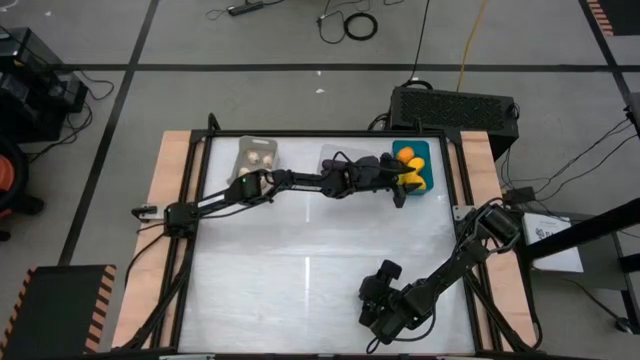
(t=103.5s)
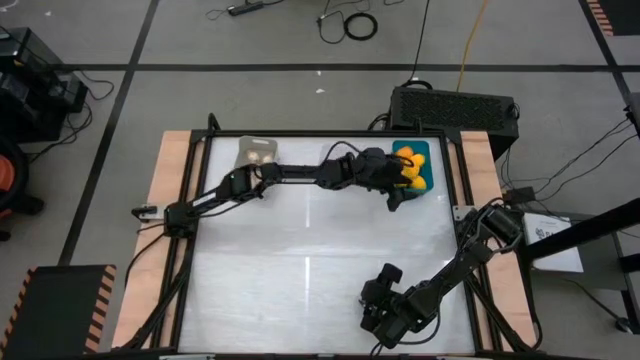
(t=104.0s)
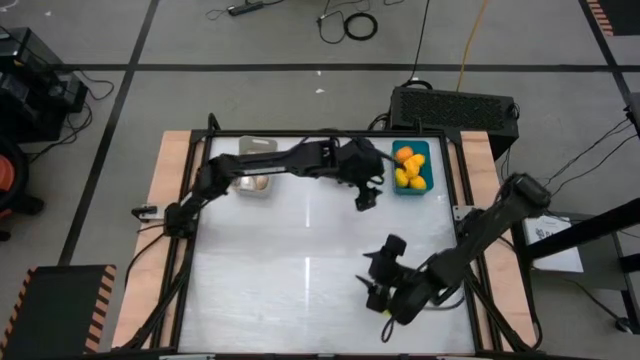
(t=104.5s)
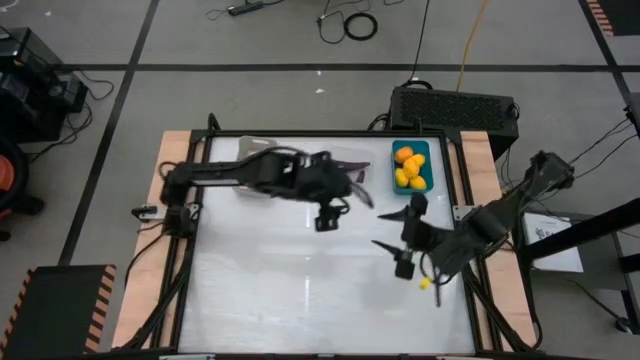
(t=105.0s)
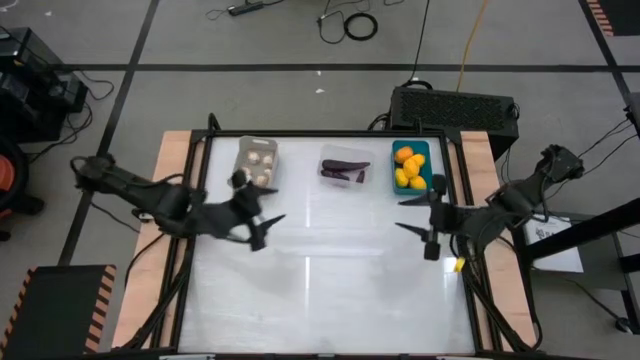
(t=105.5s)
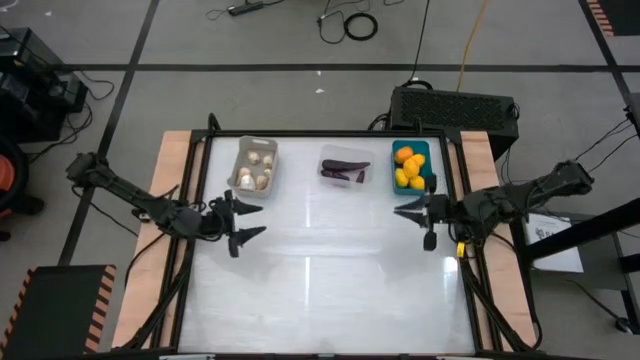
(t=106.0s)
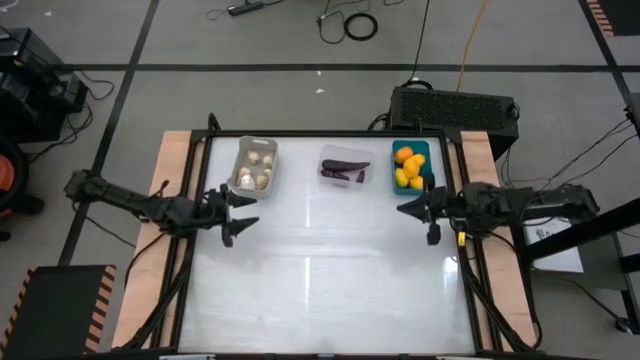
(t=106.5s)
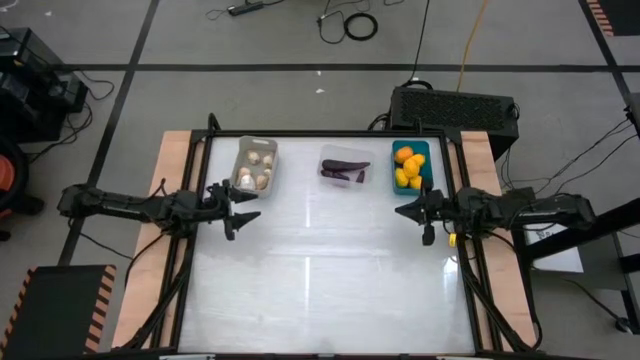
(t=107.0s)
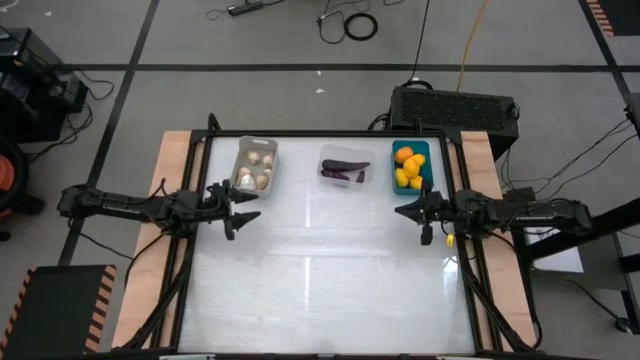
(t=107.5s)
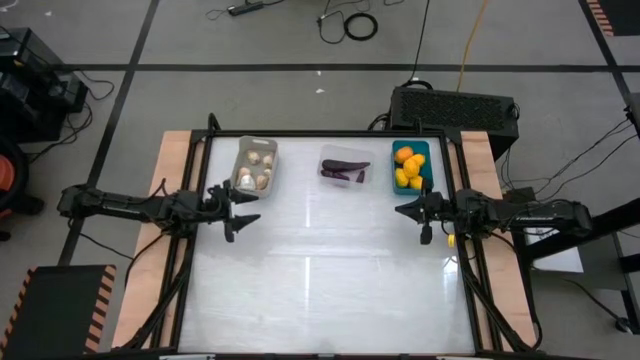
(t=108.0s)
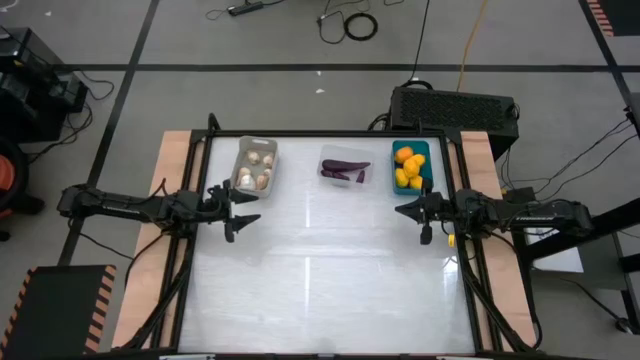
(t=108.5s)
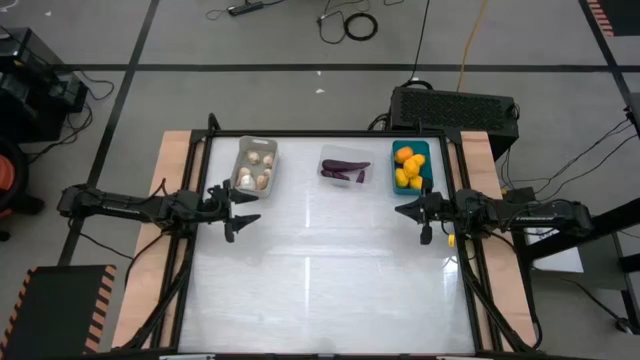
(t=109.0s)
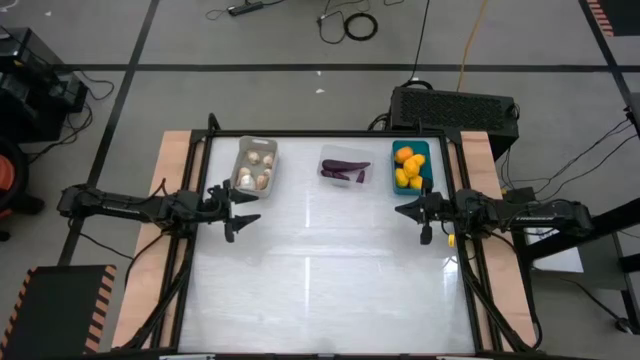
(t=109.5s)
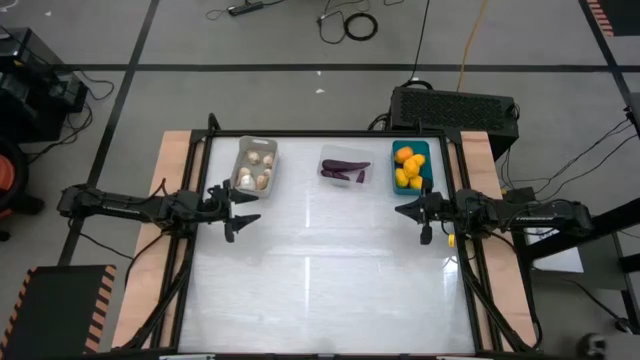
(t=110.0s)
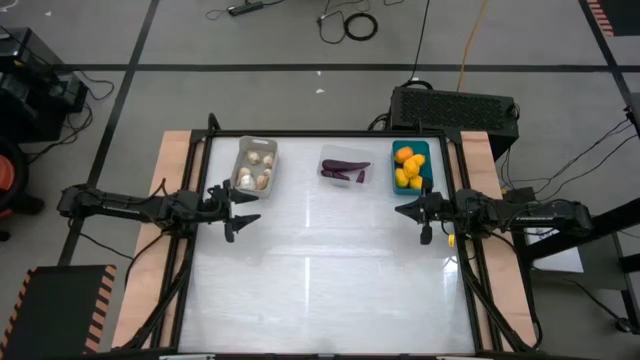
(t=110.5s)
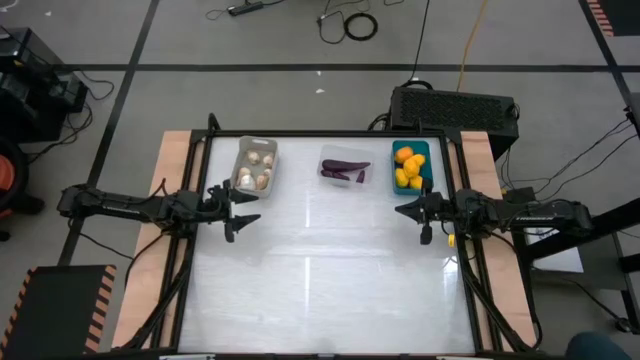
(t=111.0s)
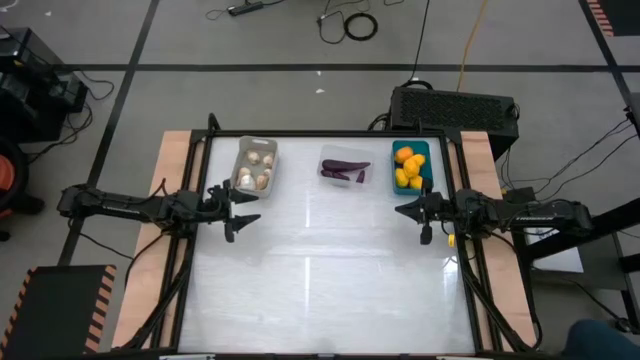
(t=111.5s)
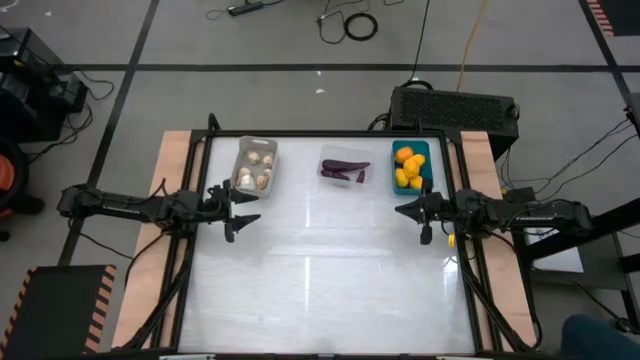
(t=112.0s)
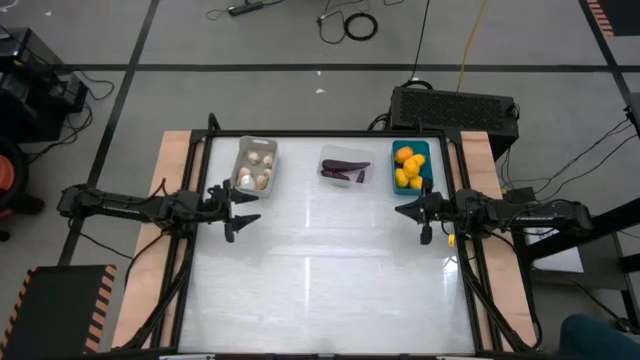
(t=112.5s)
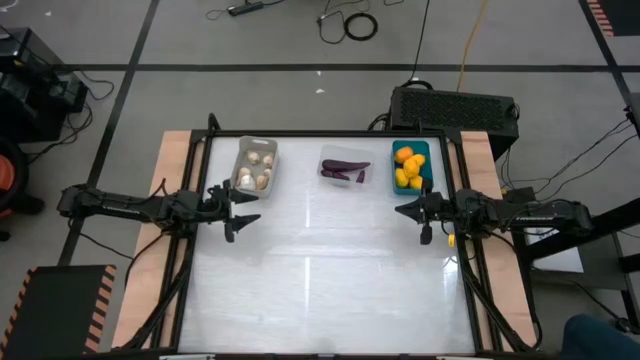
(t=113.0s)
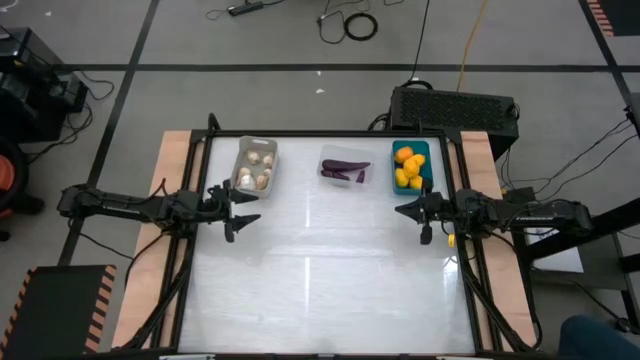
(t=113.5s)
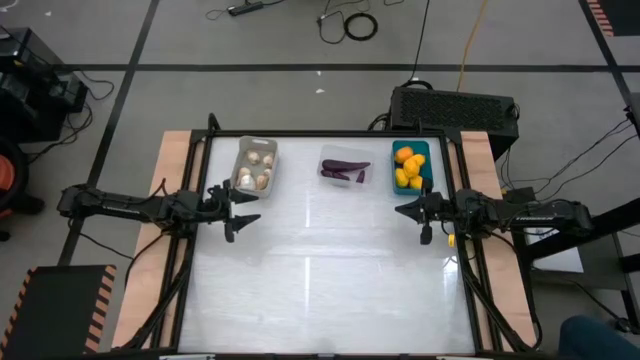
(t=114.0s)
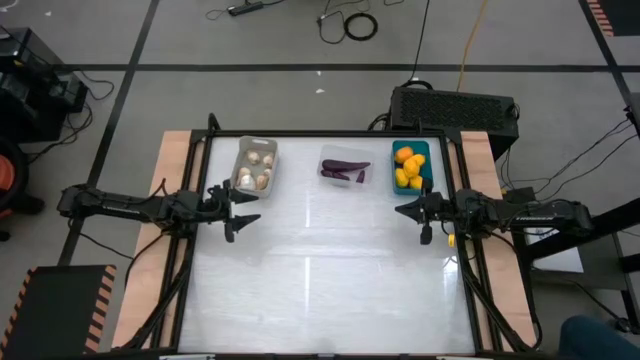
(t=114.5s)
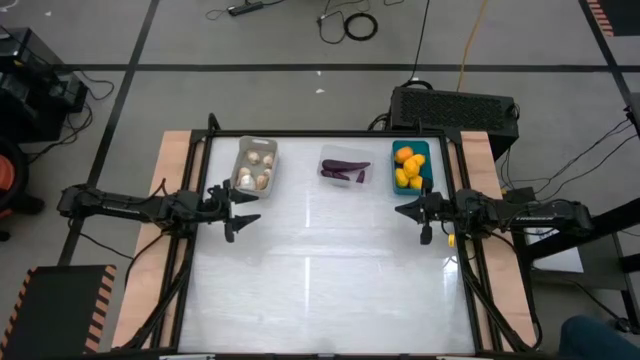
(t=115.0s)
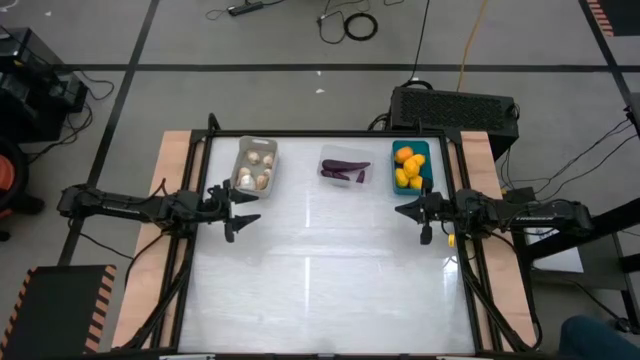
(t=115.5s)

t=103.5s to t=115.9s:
Task: Sort produce into baskets
Return to Home Position

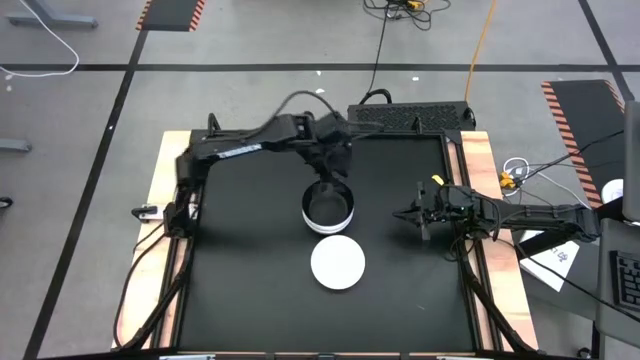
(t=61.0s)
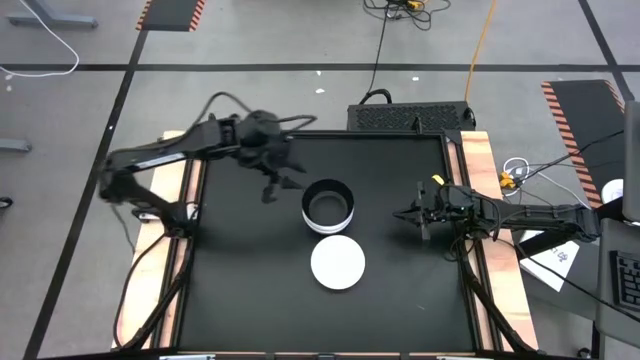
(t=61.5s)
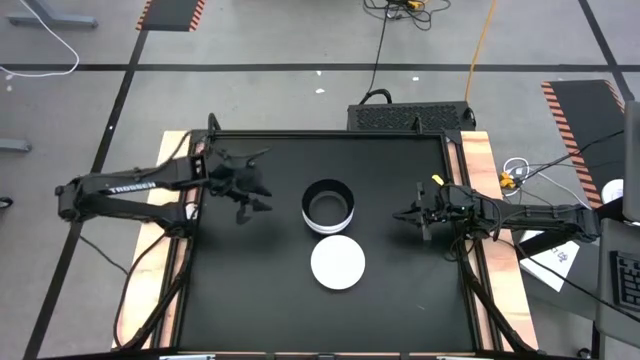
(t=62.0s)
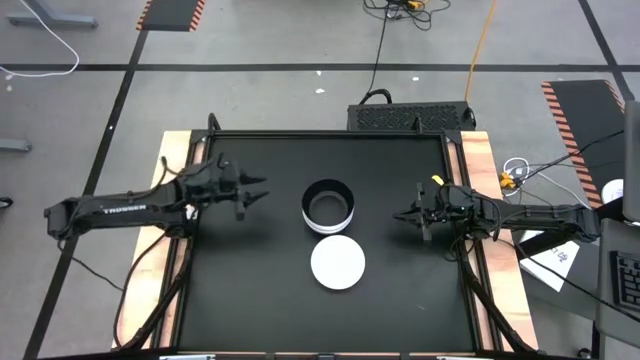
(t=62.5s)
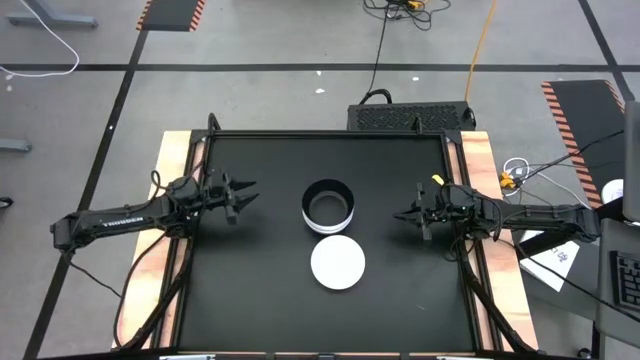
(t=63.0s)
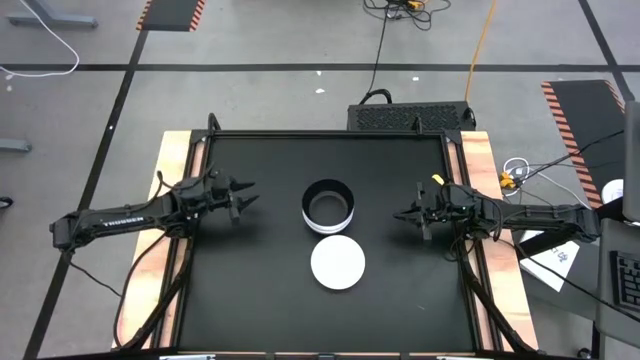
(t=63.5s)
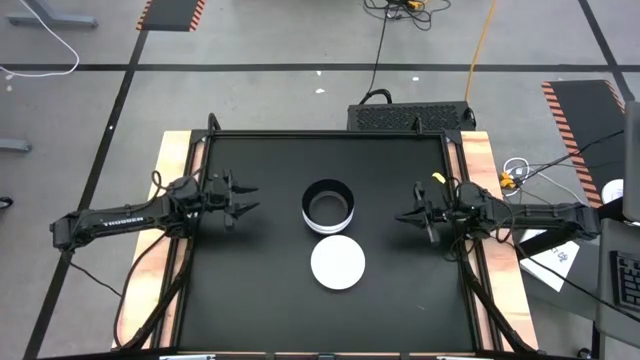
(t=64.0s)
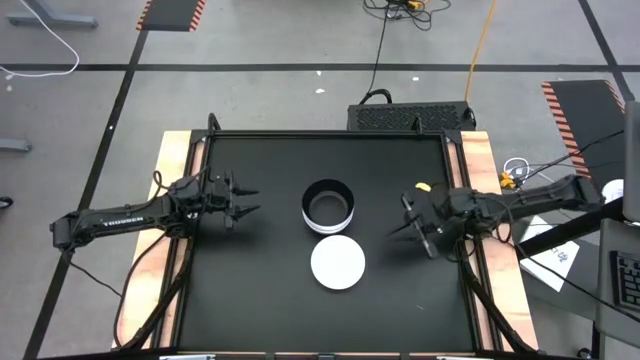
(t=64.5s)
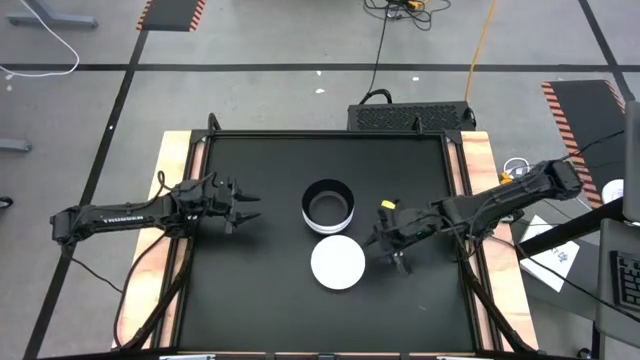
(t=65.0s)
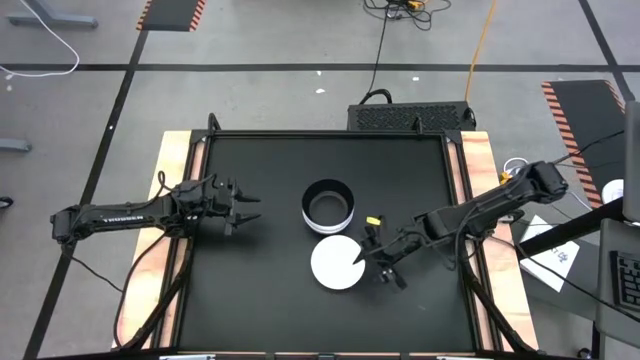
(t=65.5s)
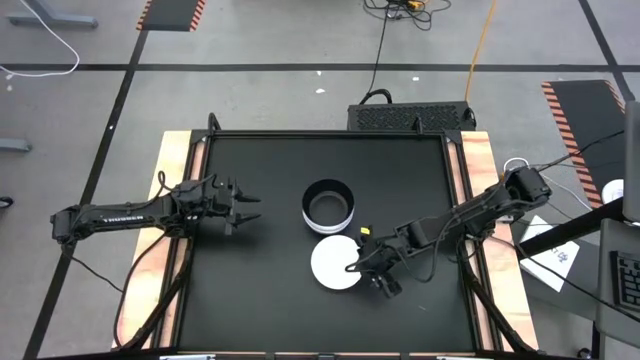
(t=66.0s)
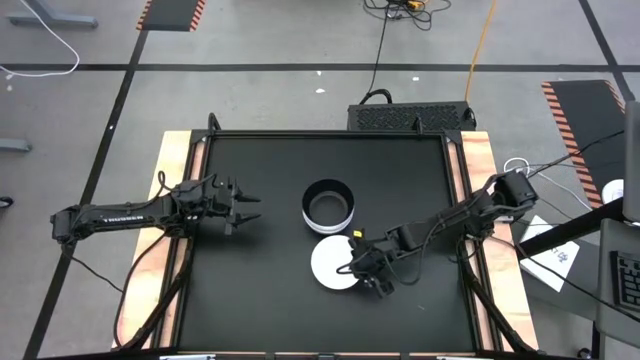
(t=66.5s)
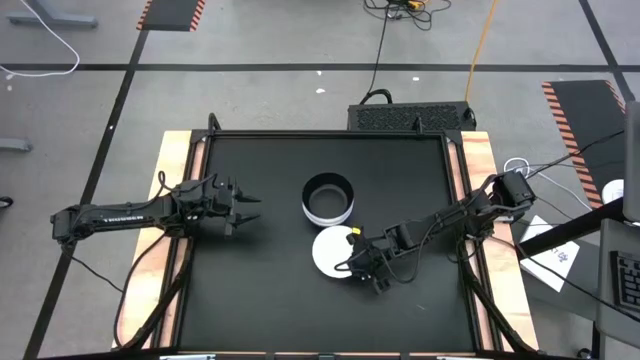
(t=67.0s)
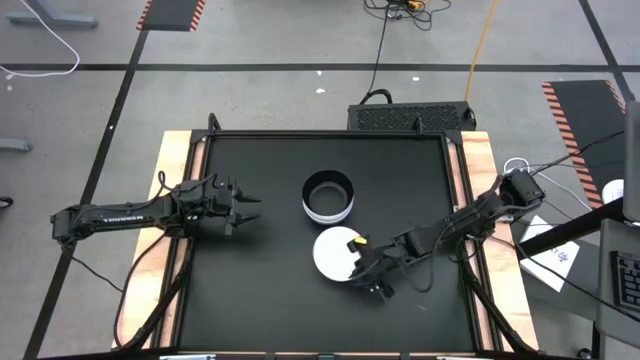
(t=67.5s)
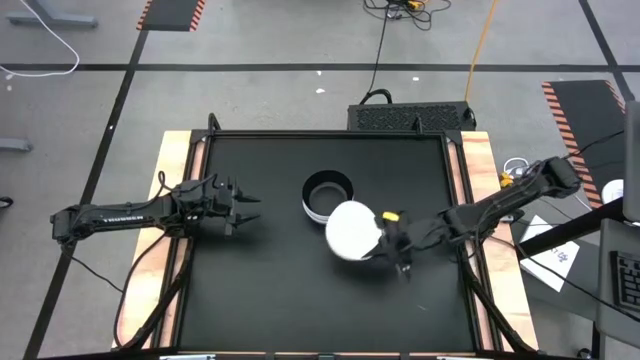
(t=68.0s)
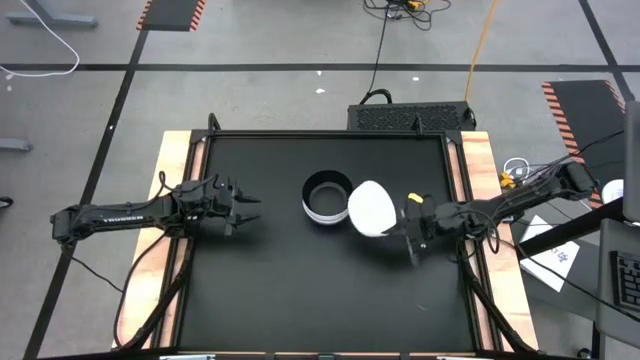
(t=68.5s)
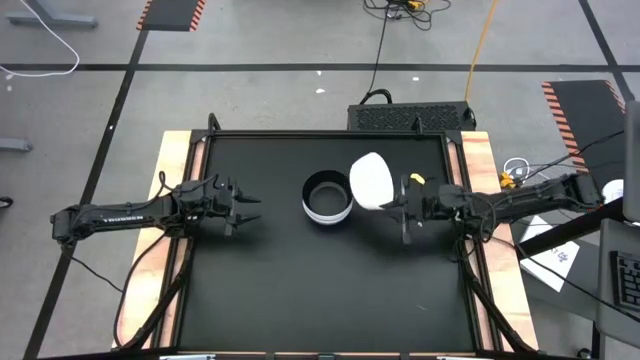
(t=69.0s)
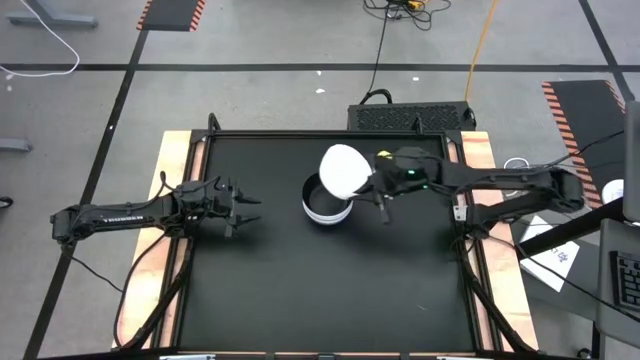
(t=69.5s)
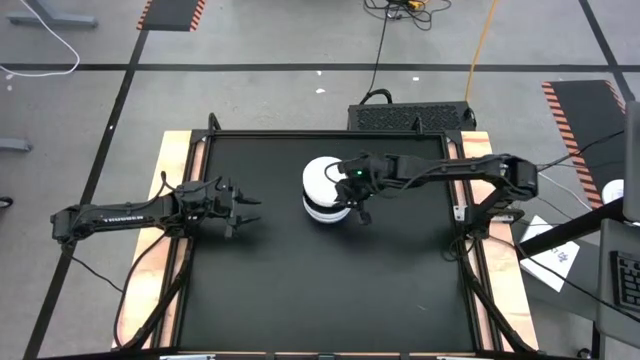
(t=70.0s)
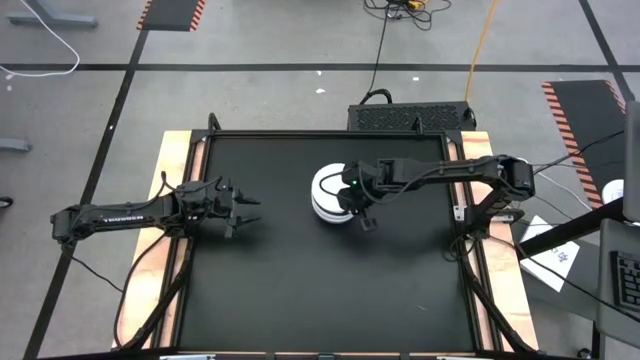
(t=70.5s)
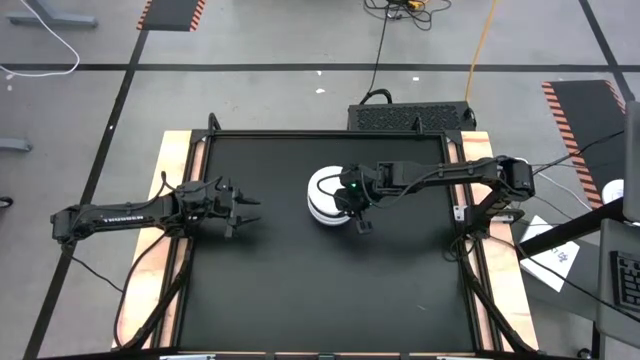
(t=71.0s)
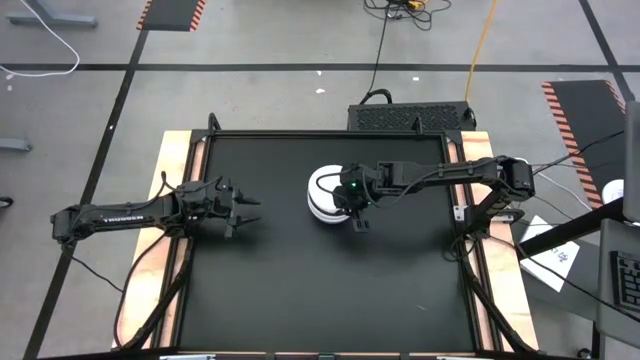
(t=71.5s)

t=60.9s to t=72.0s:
Task: Nest bowls inside each other
Stack the white bowl on top of the black bowl
